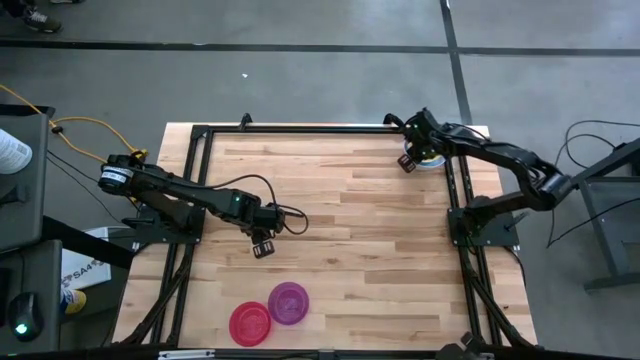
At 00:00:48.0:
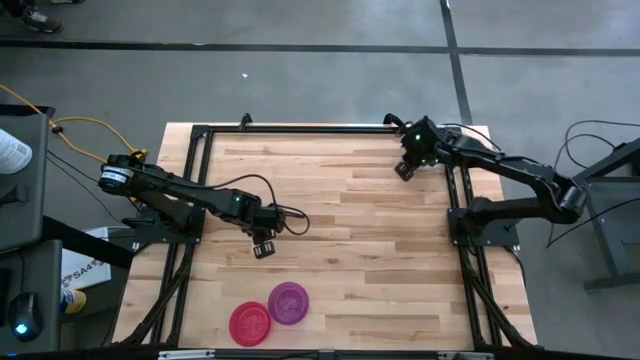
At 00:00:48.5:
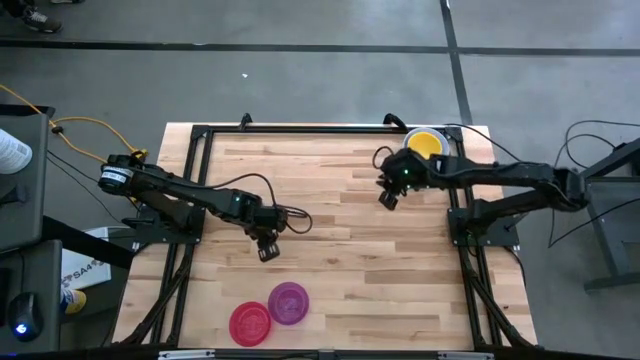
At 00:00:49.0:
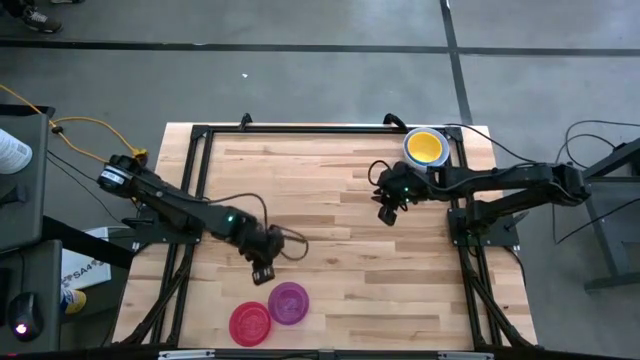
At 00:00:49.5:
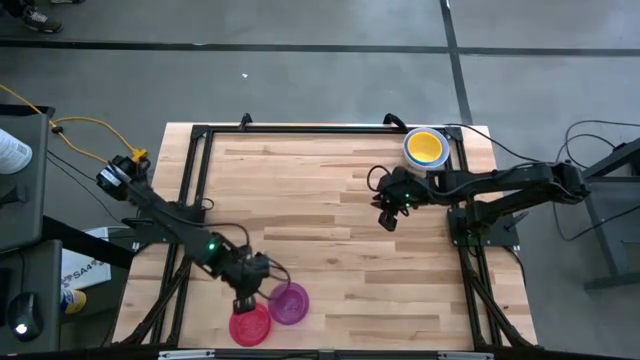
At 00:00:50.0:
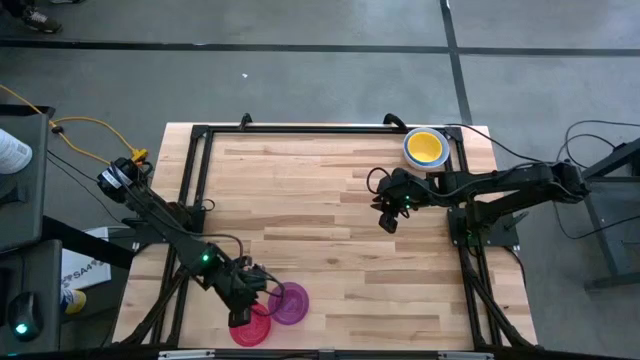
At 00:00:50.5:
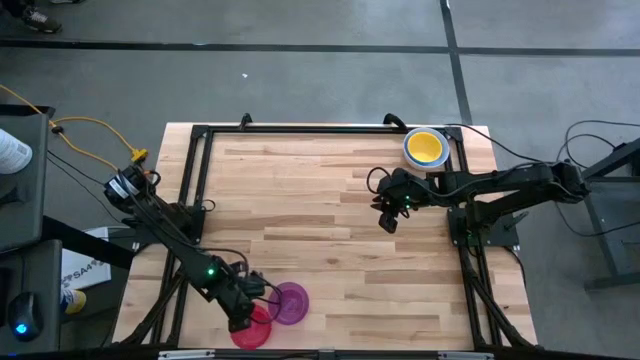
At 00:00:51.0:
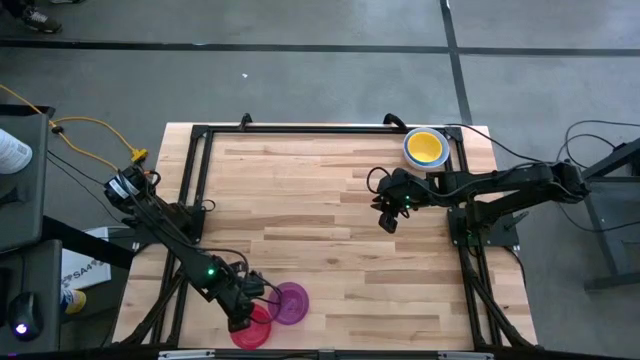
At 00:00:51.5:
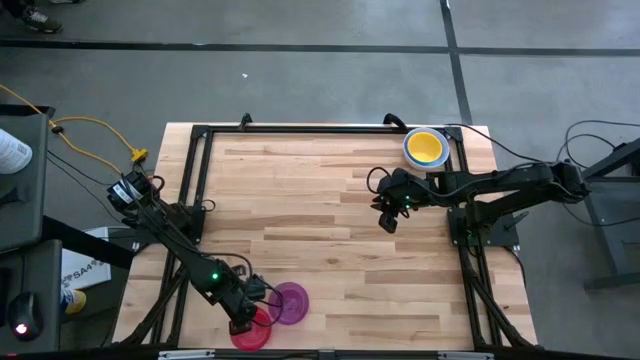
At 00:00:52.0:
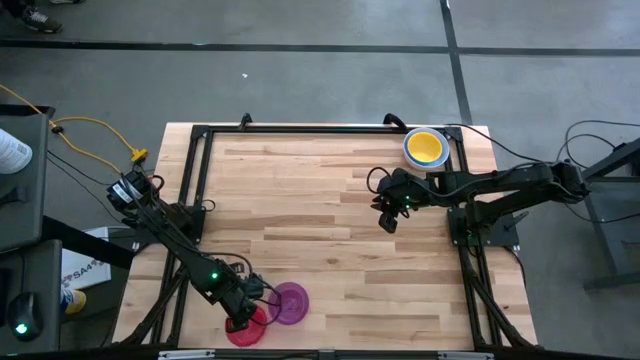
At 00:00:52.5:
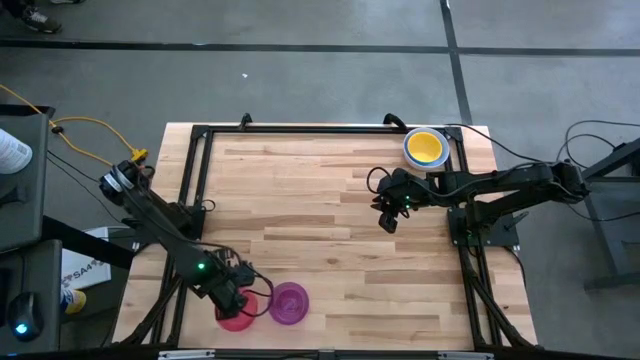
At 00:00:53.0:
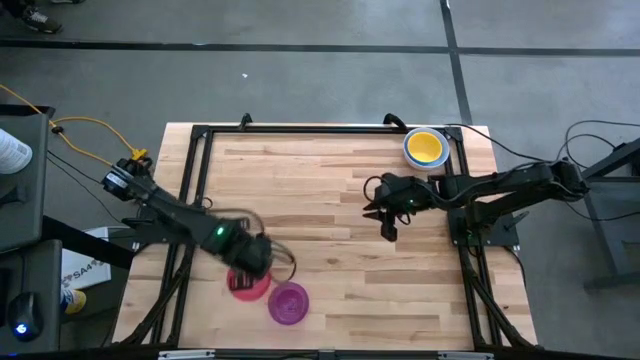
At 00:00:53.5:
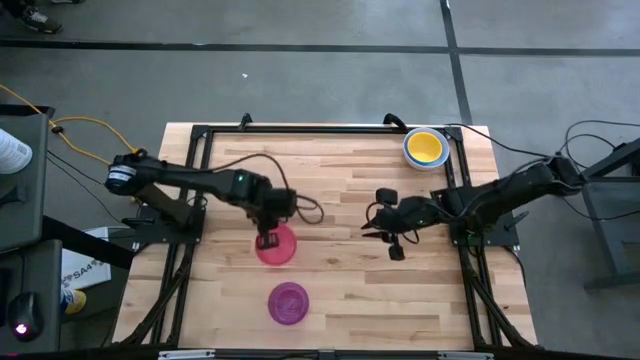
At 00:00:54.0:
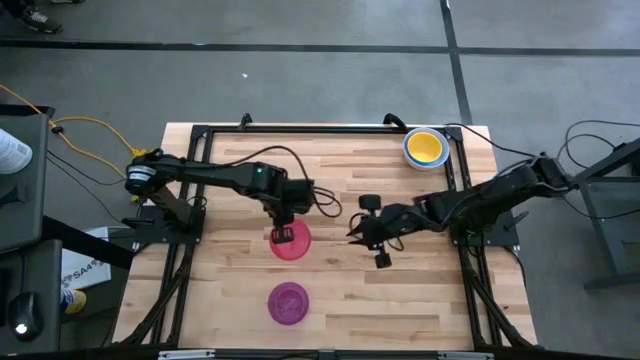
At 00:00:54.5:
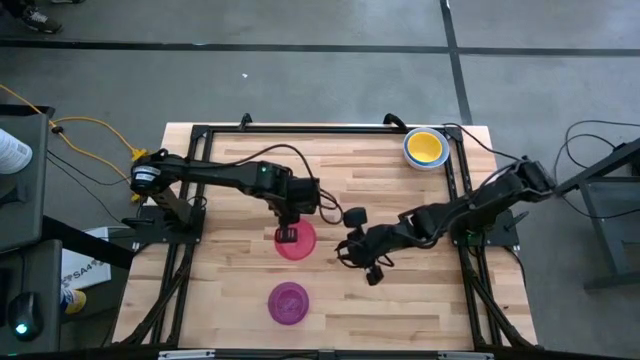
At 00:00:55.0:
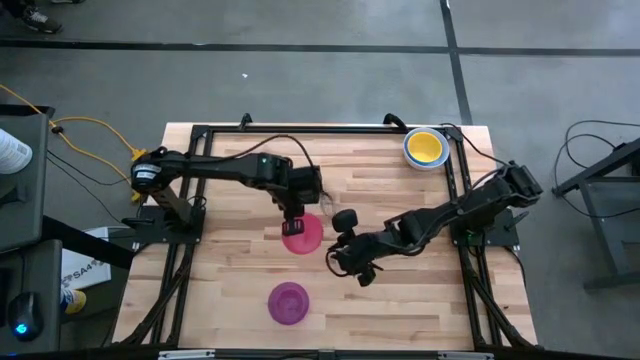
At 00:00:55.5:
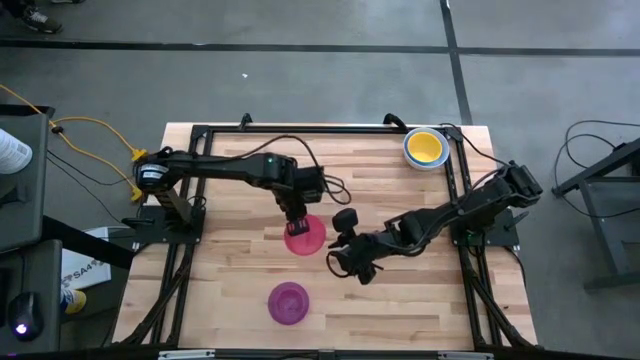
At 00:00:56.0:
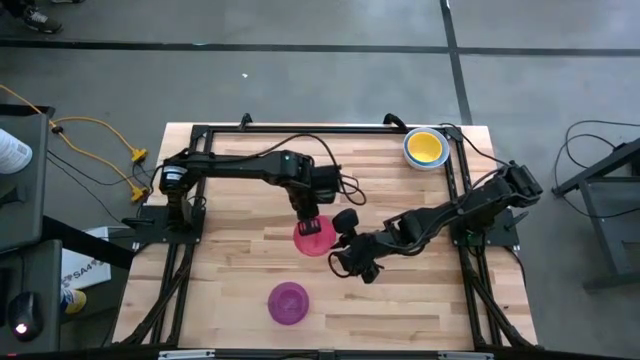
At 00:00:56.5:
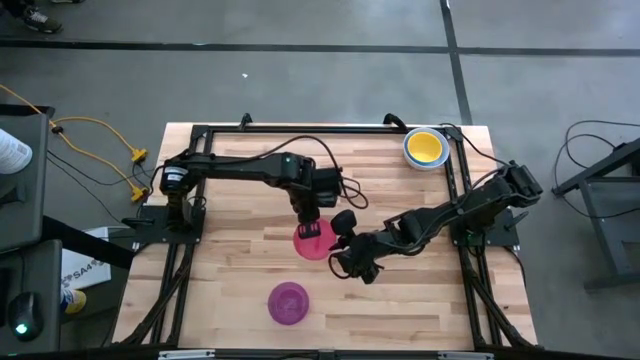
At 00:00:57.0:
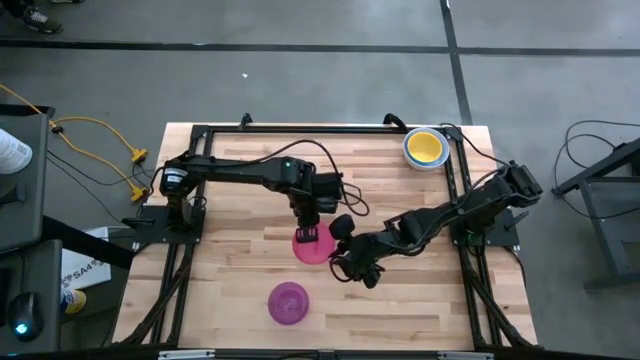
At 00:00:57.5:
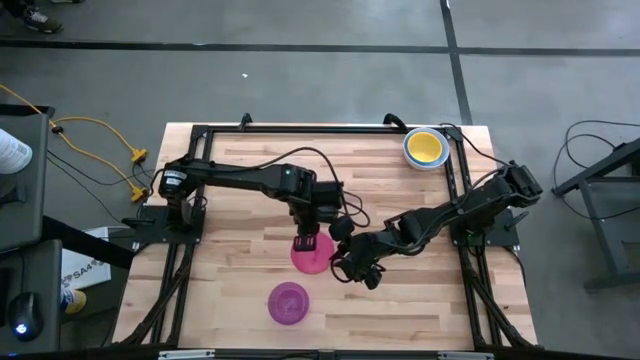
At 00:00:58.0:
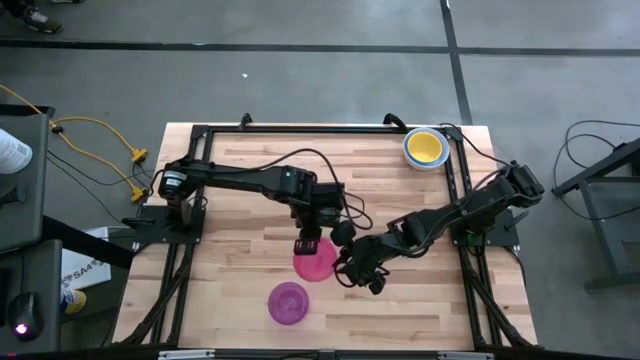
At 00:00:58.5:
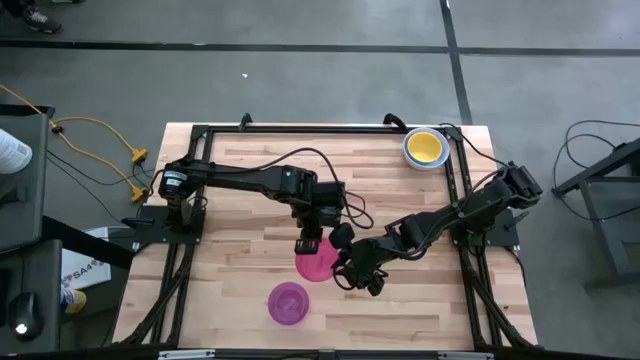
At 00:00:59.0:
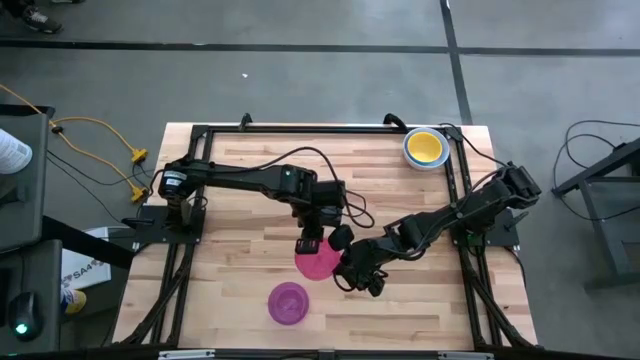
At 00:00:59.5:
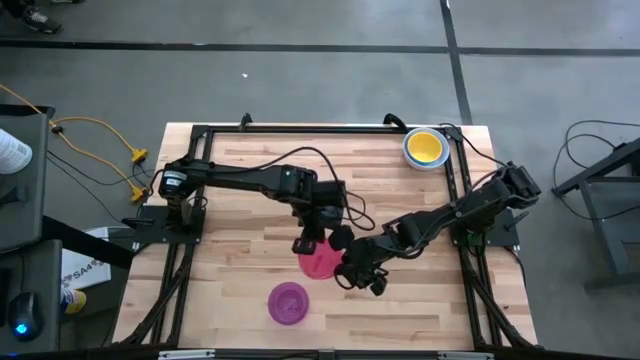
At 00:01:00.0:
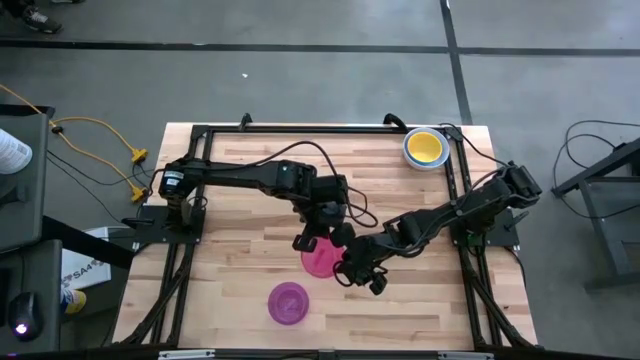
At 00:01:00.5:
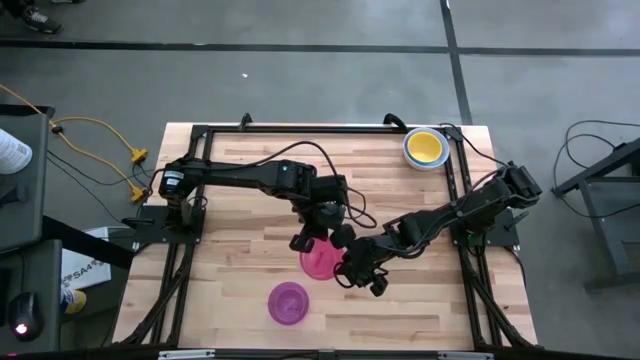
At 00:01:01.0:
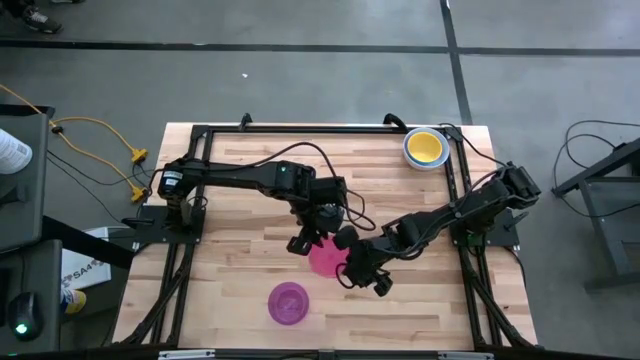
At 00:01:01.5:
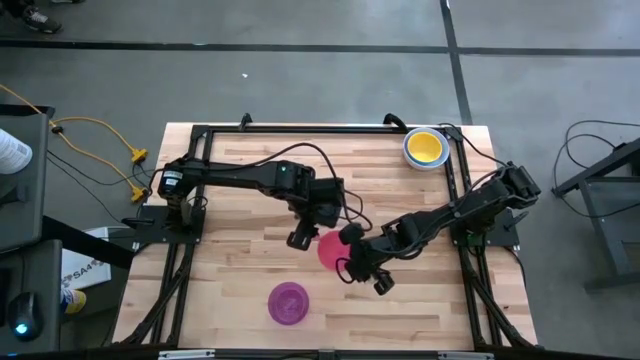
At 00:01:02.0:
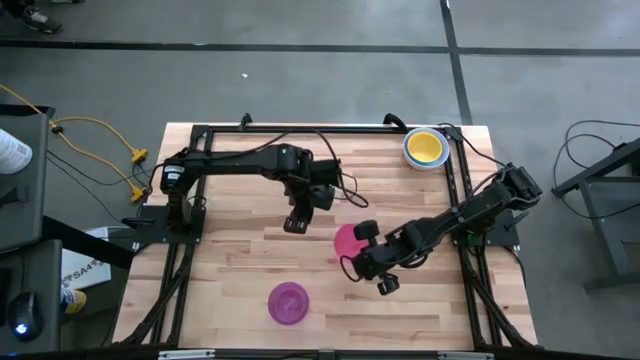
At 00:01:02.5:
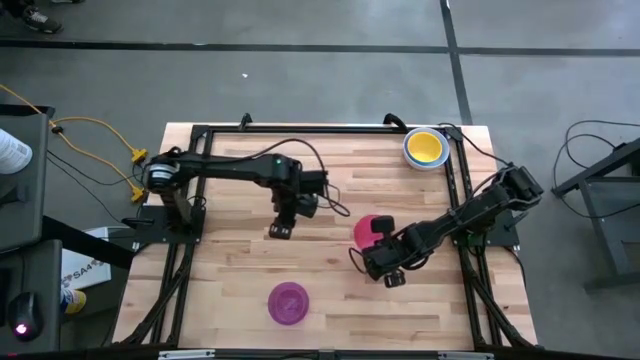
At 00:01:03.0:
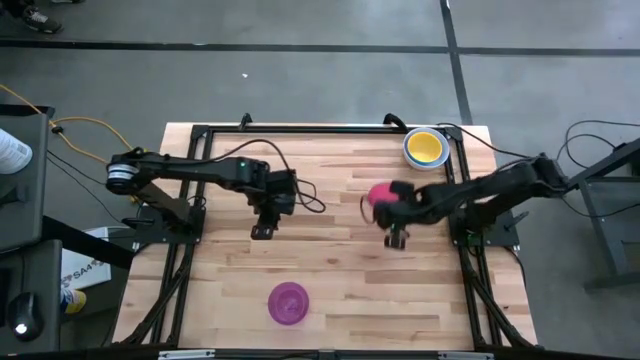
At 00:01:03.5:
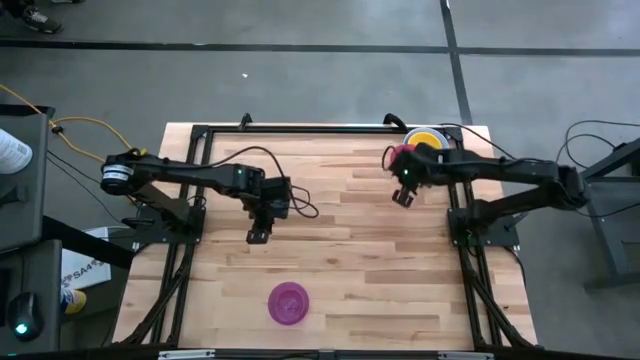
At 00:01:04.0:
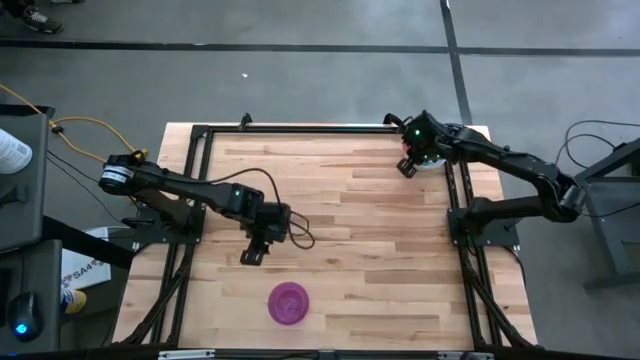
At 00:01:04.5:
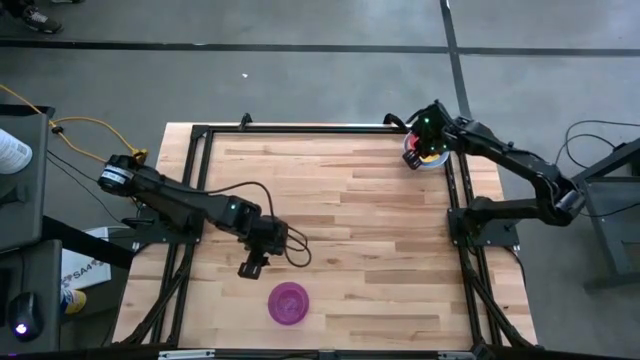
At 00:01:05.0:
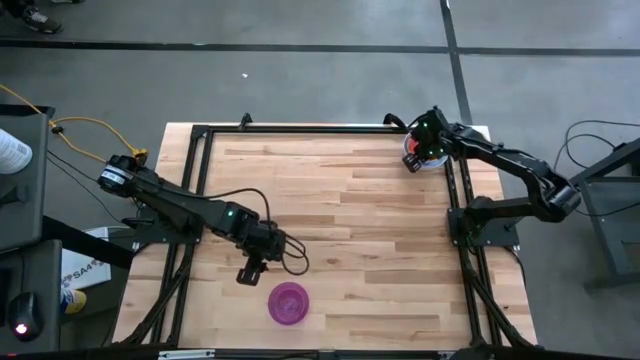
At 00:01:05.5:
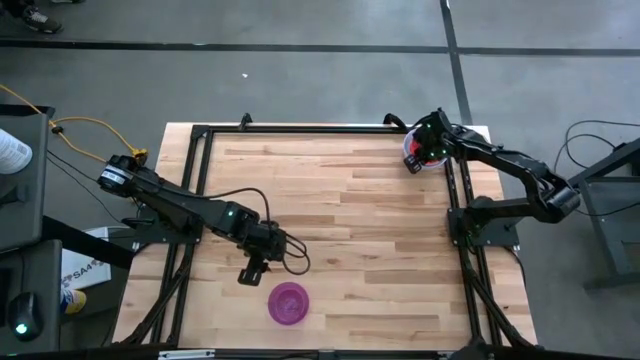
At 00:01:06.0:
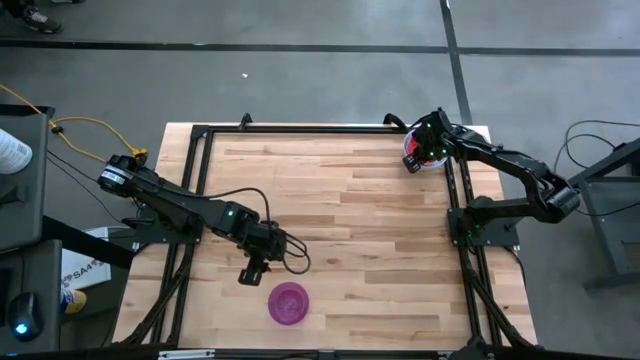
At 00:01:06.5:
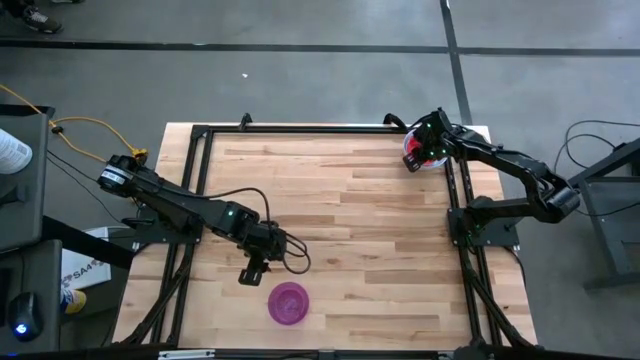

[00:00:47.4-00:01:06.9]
Stack the red bowl on the yellow bowl
